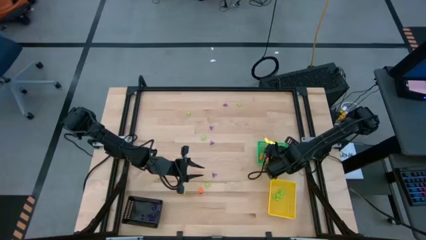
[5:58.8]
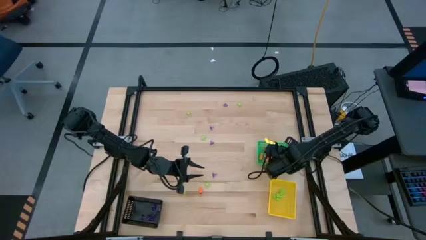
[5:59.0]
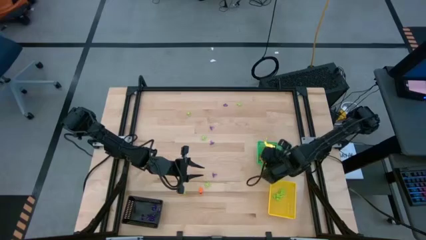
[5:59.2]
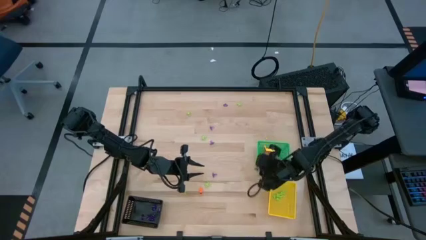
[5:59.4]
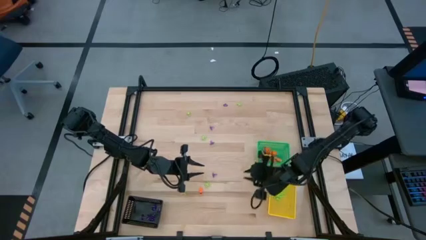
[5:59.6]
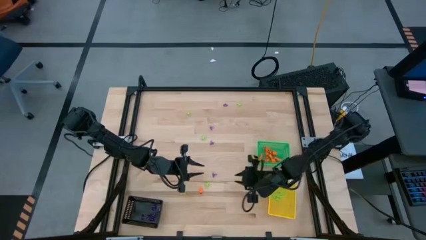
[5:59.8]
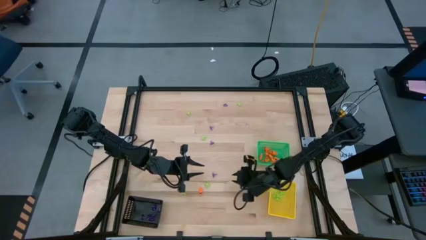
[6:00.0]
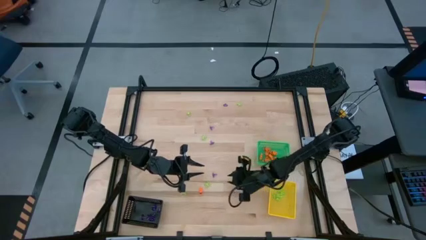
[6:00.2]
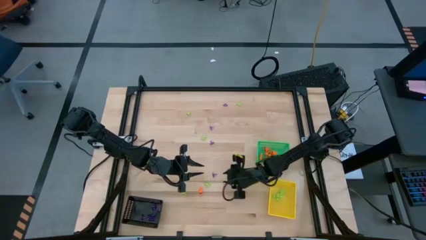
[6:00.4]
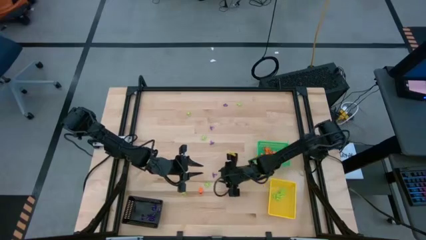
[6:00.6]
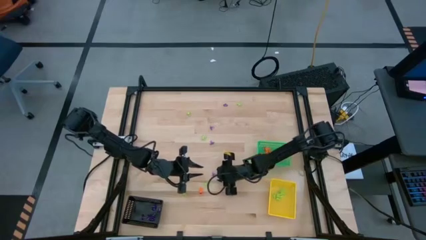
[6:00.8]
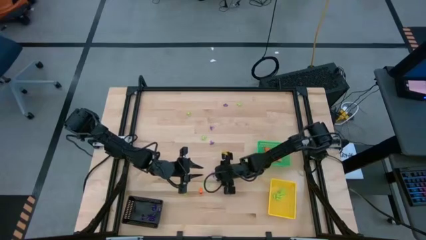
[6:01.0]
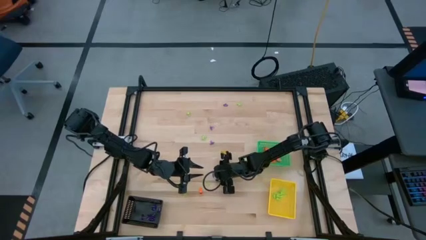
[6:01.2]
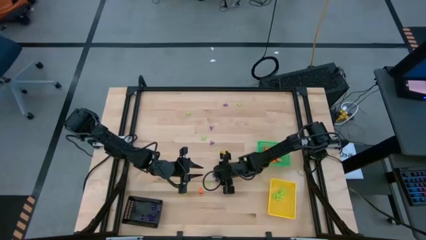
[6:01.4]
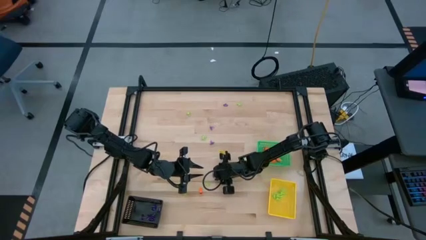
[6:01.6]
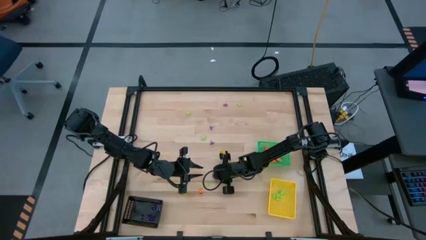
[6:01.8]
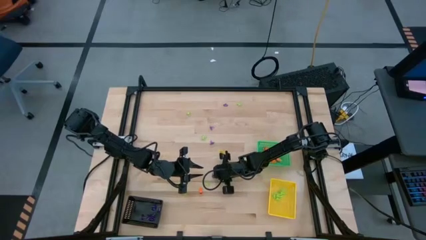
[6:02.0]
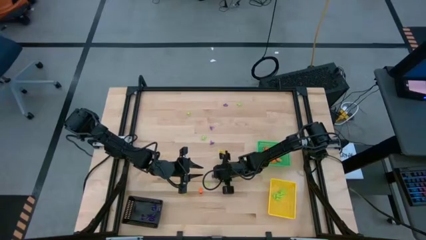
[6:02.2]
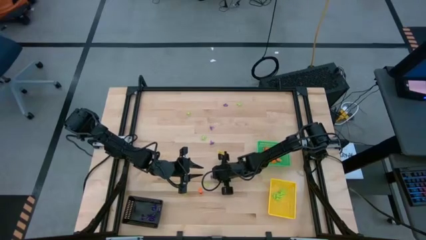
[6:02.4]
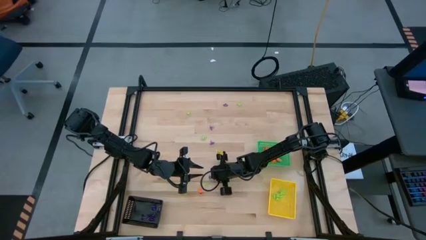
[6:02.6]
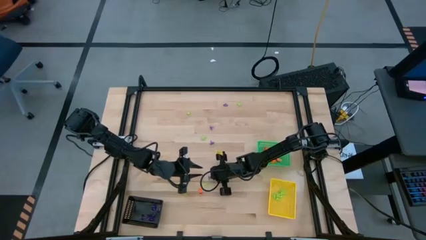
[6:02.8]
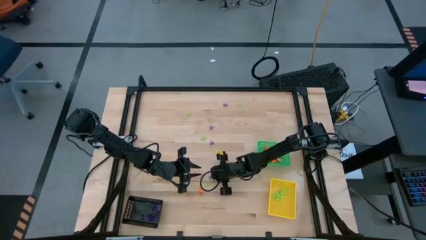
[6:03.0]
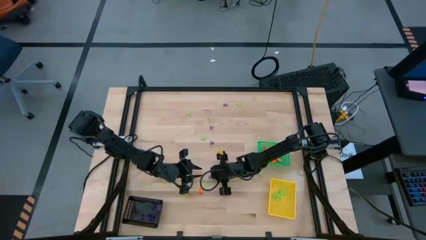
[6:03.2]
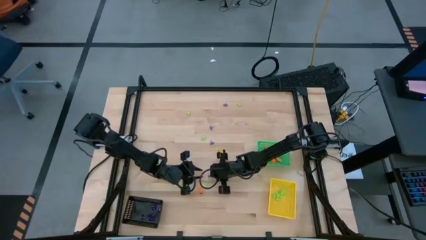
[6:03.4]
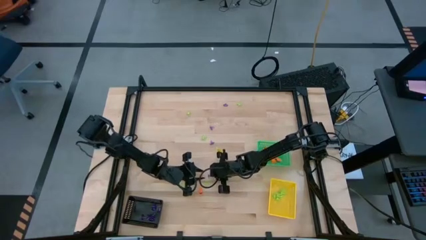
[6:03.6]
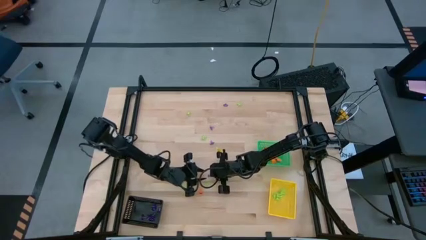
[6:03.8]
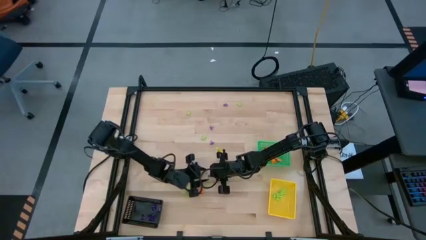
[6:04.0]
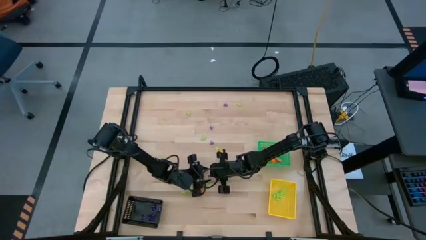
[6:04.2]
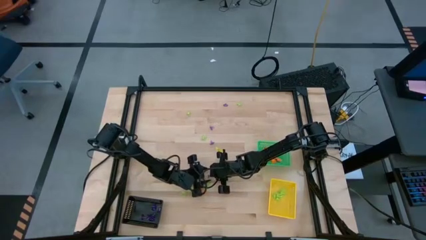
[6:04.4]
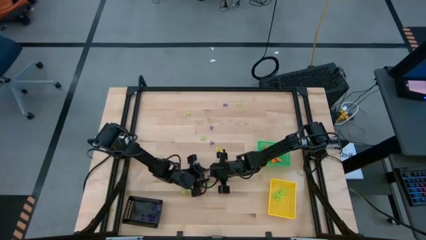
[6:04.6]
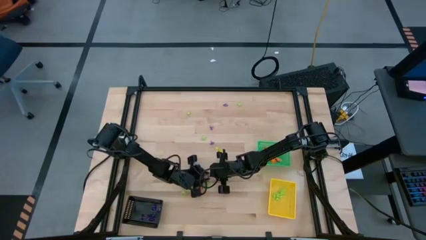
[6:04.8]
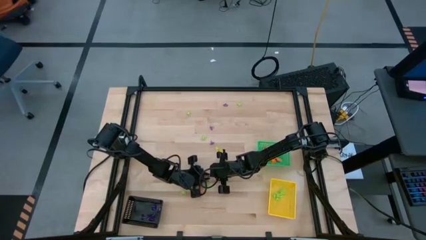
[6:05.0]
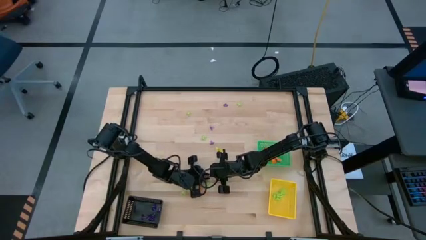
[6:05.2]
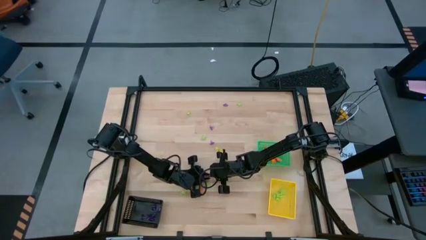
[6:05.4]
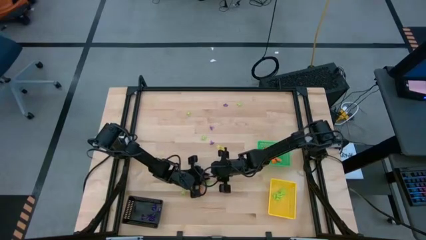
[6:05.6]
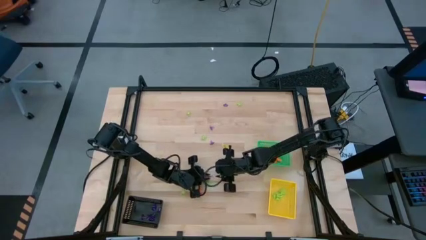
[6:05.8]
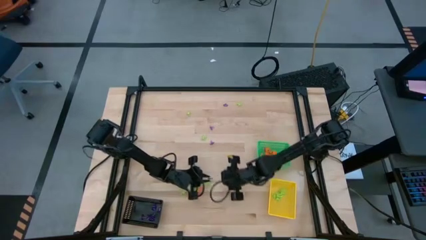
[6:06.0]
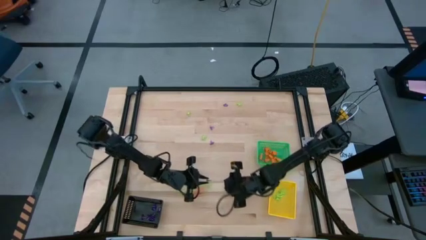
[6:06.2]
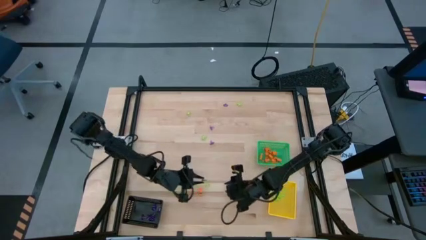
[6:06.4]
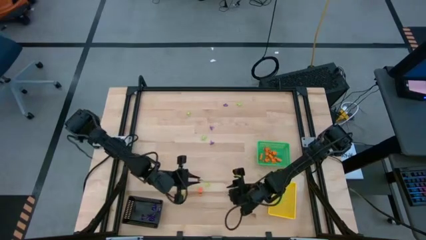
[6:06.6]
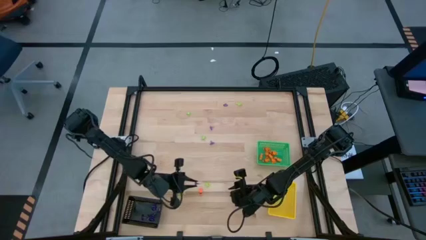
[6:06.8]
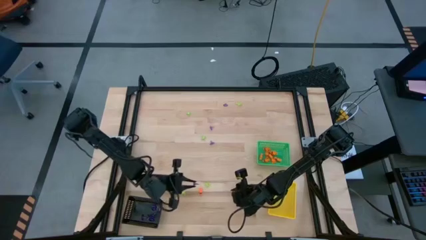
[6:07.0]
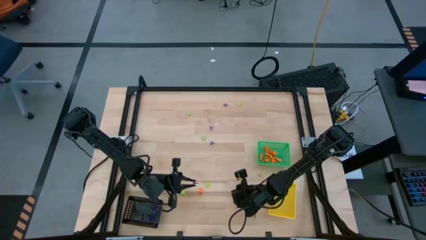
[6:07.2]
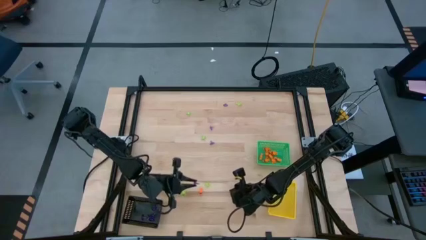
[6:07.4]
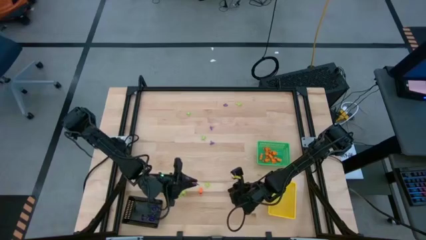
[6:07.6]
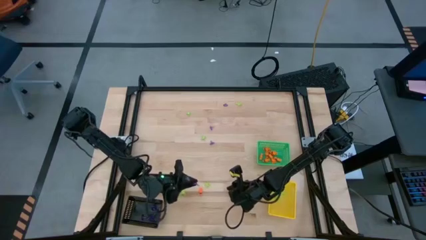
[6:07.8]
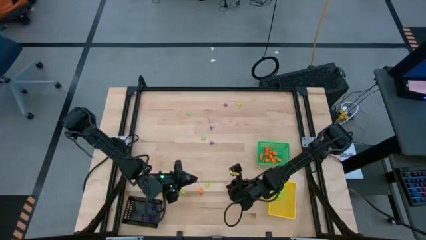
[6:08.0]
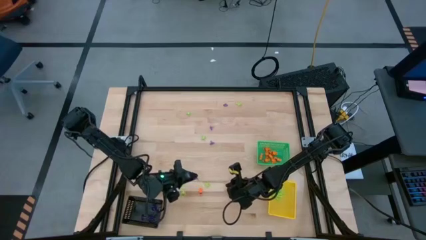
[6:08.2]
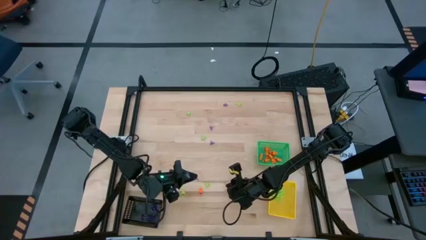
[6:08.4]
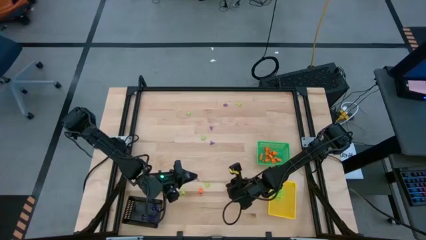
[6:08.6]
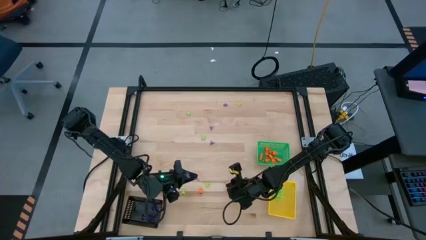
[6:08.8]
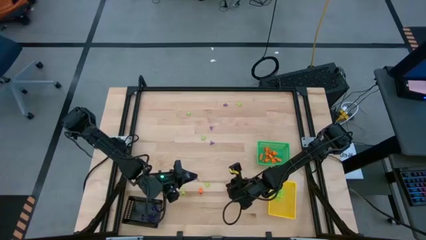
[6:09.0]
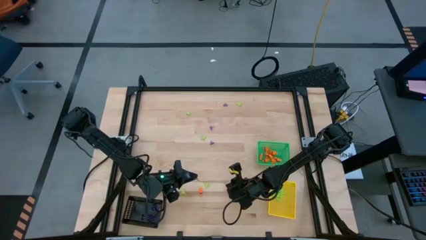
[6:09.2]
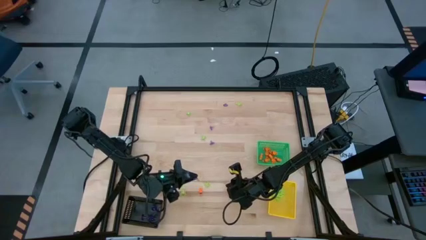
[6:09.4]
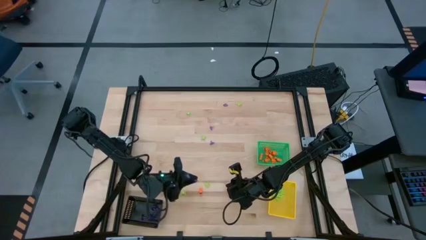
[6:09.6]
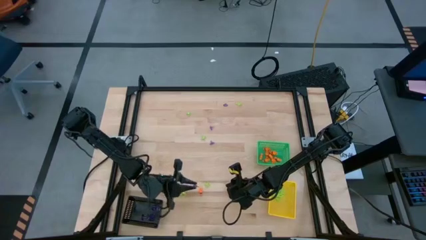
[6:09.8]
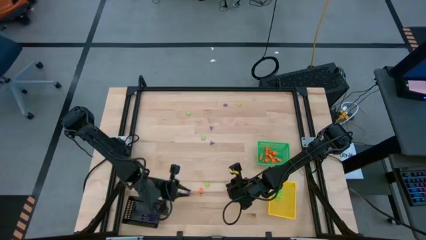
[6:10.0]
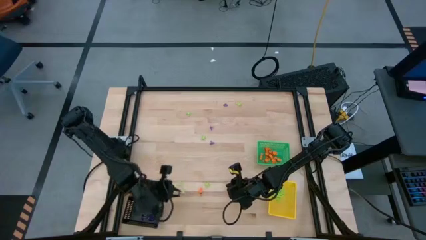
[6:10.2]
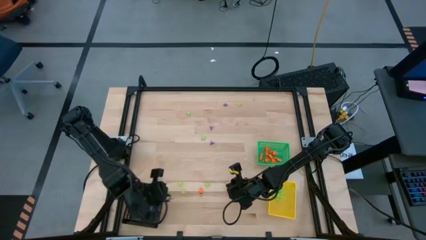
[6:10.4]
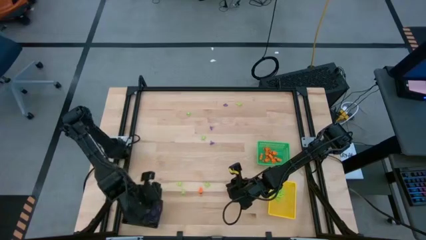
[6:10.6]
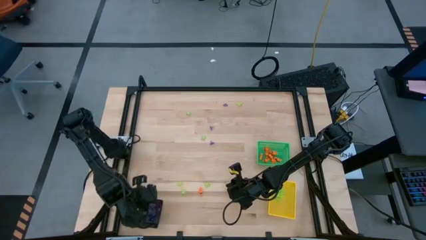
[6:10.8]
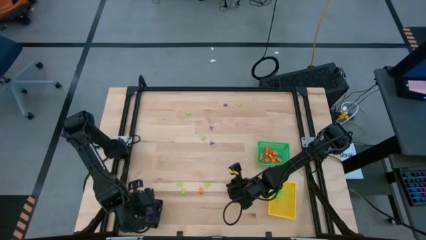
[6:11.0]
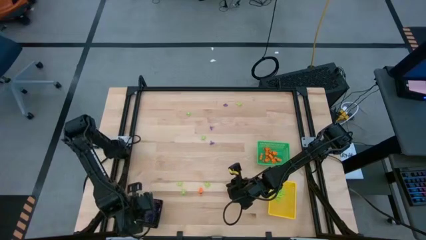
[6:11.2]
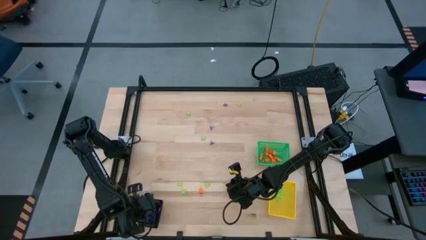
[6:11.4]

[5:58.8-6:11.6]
Task: Sort Halloween decoration
Put the purple witch hat toy into the black bin
